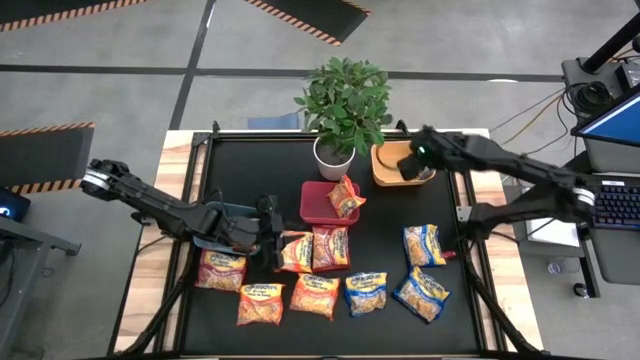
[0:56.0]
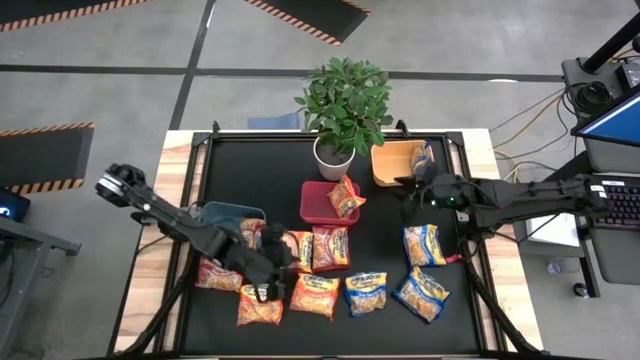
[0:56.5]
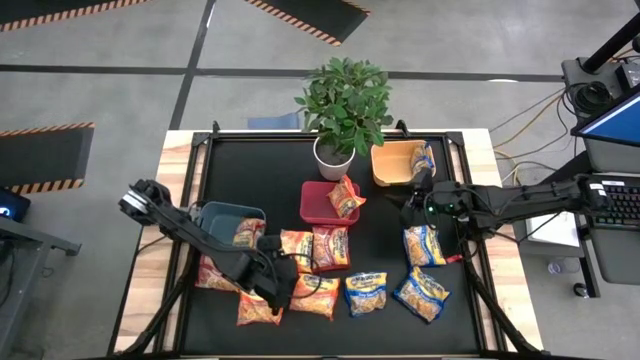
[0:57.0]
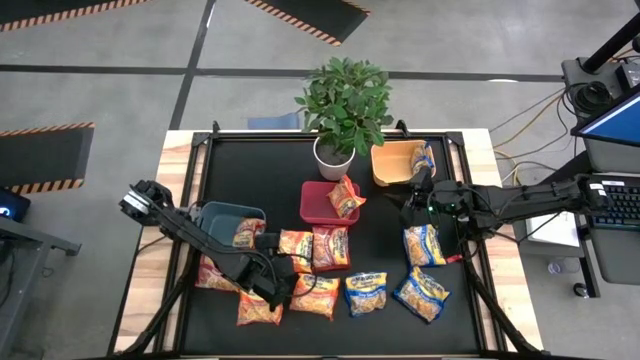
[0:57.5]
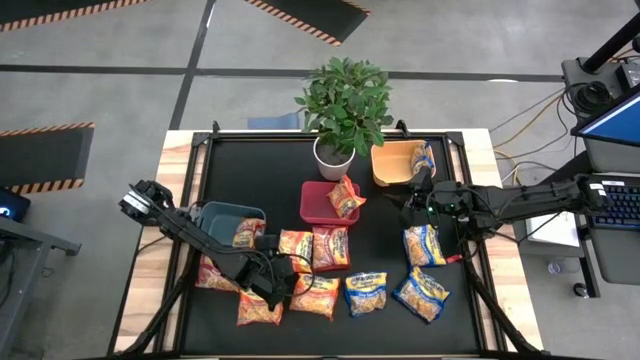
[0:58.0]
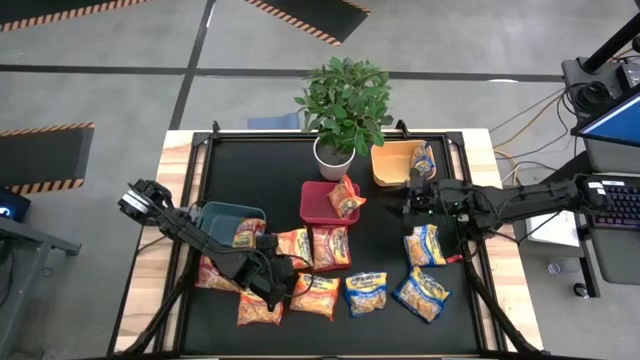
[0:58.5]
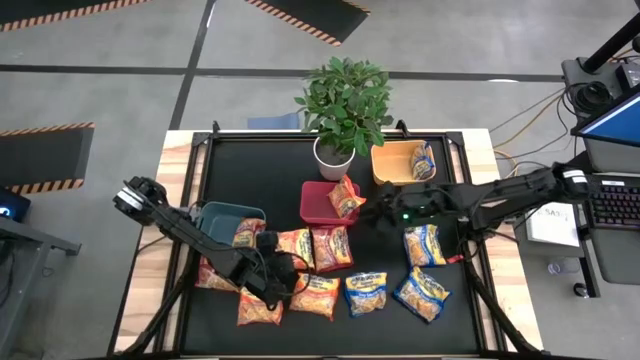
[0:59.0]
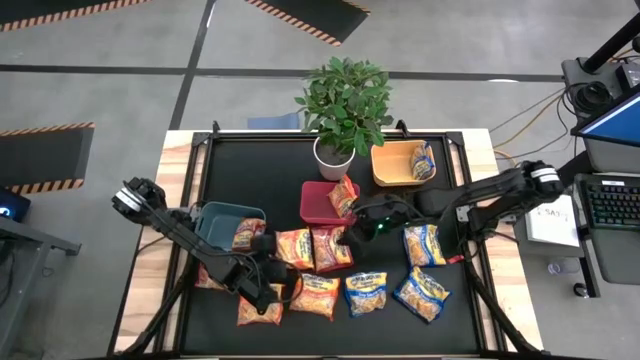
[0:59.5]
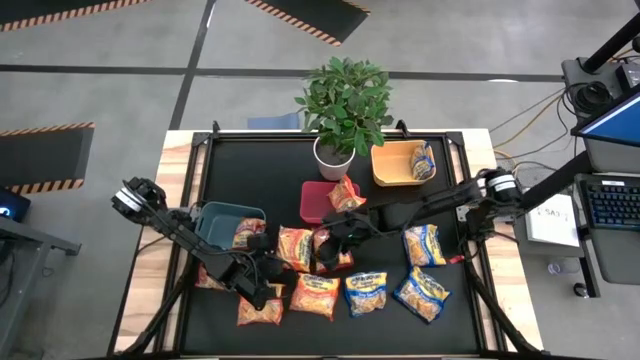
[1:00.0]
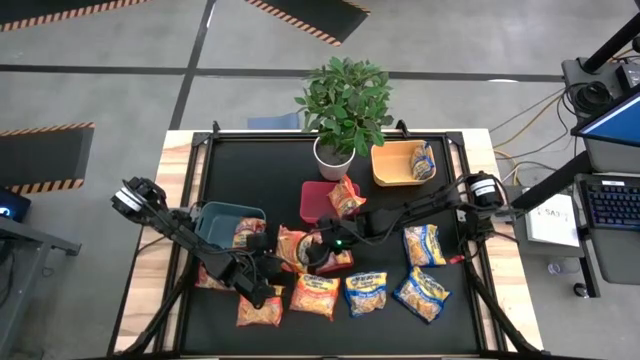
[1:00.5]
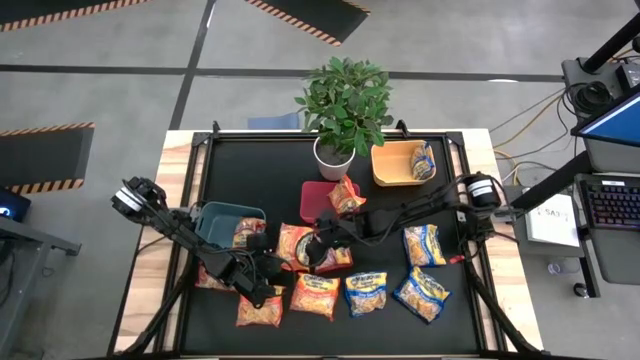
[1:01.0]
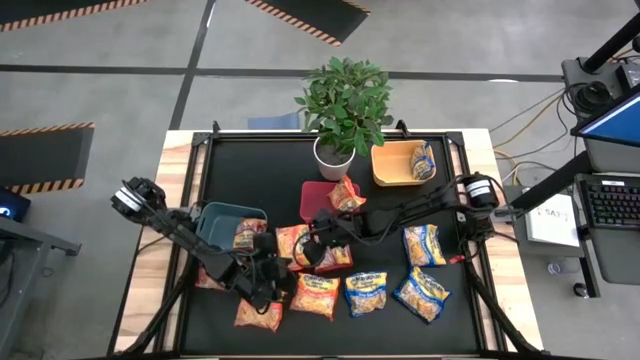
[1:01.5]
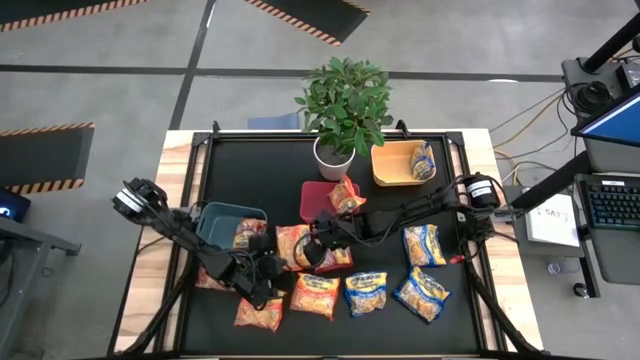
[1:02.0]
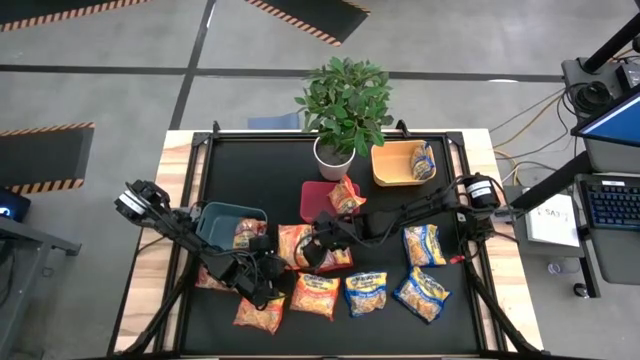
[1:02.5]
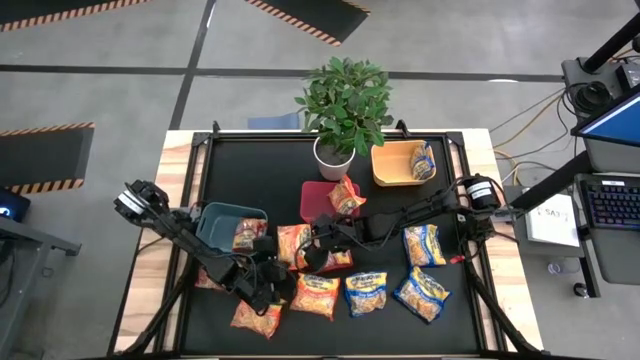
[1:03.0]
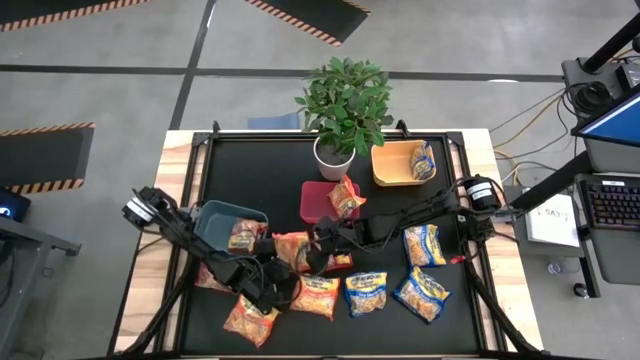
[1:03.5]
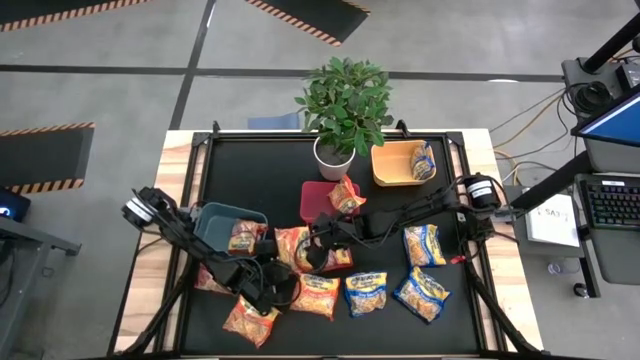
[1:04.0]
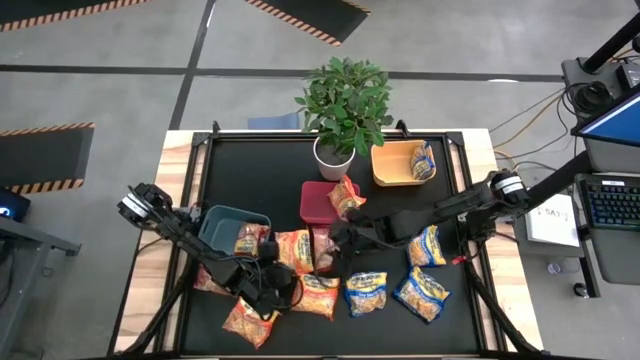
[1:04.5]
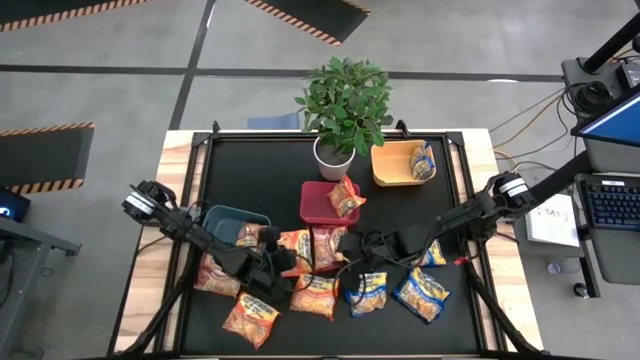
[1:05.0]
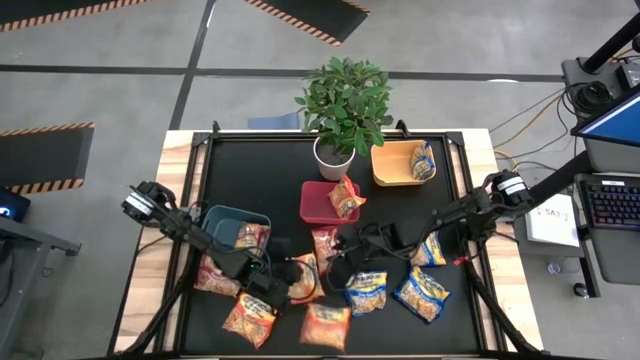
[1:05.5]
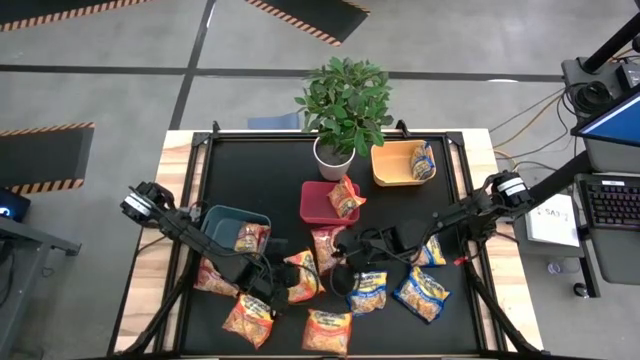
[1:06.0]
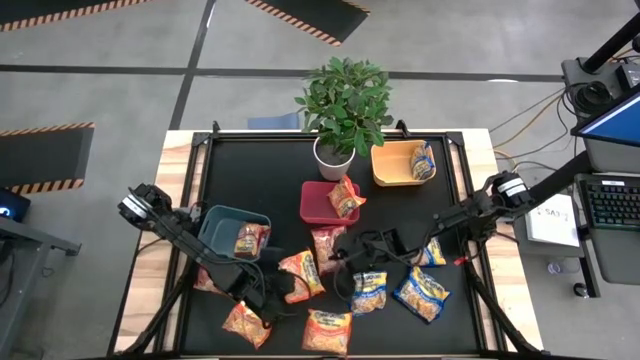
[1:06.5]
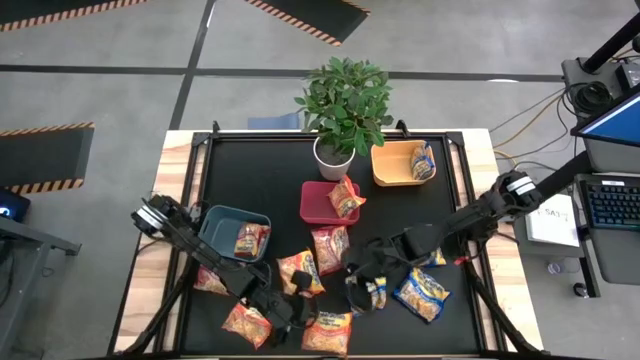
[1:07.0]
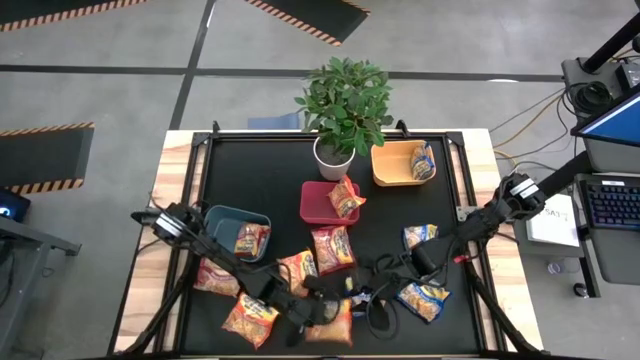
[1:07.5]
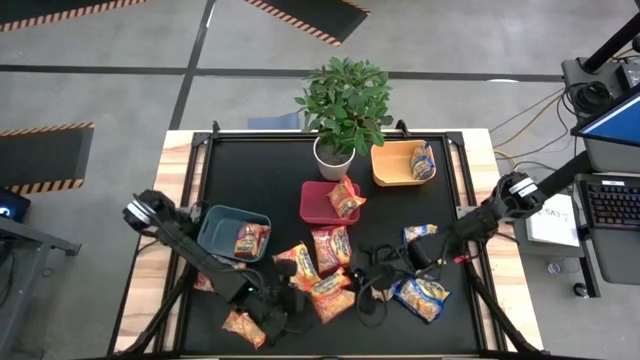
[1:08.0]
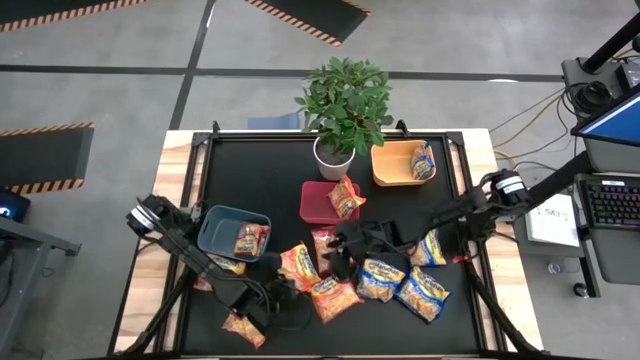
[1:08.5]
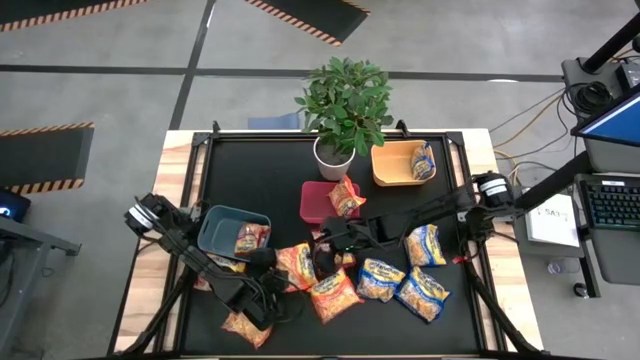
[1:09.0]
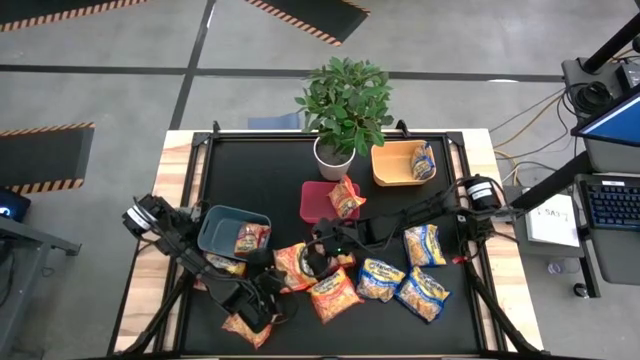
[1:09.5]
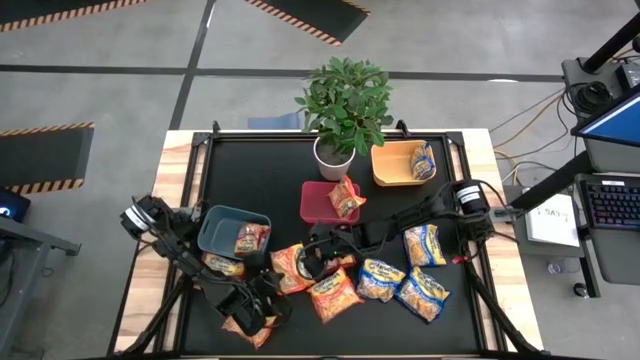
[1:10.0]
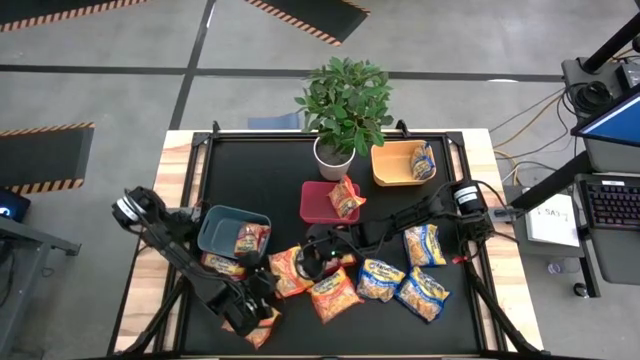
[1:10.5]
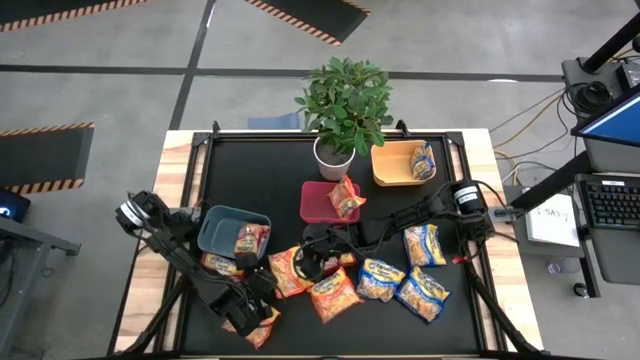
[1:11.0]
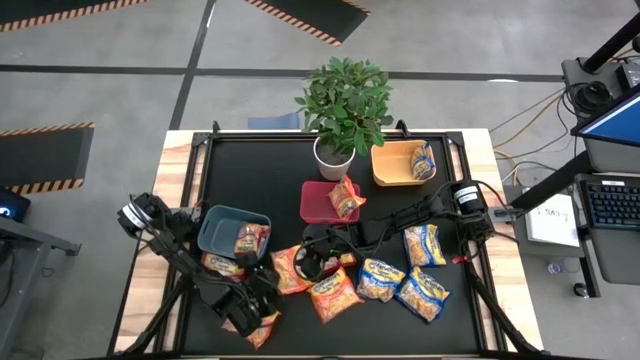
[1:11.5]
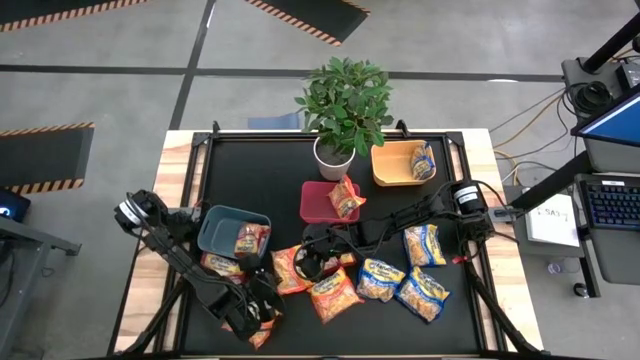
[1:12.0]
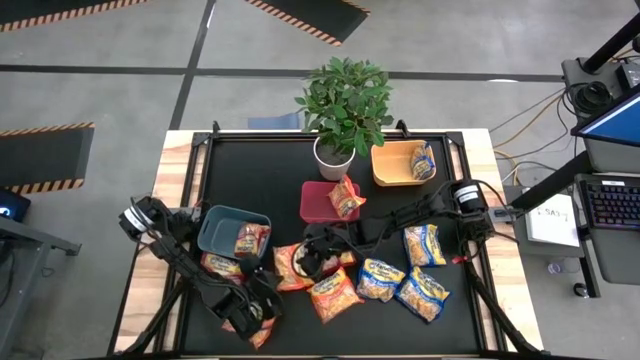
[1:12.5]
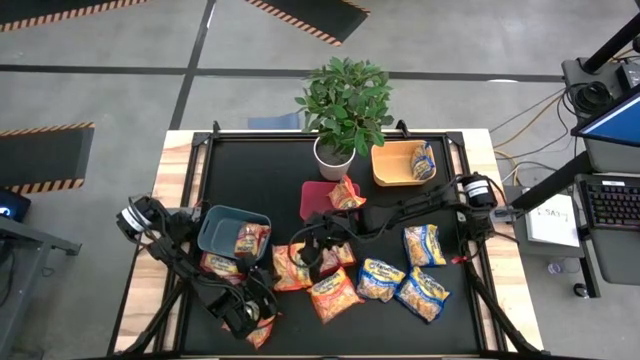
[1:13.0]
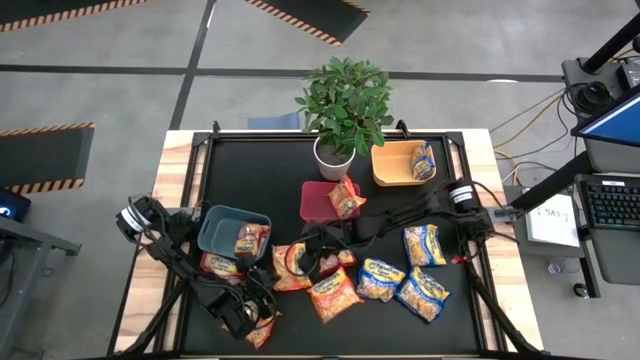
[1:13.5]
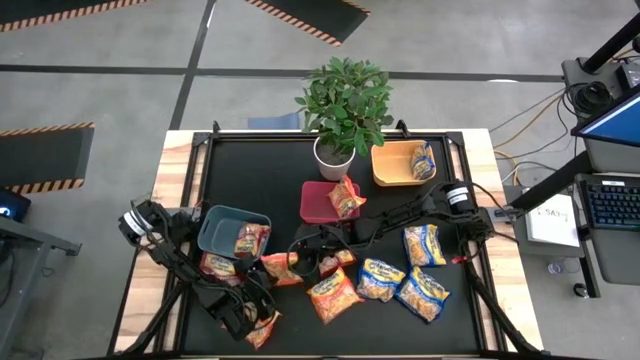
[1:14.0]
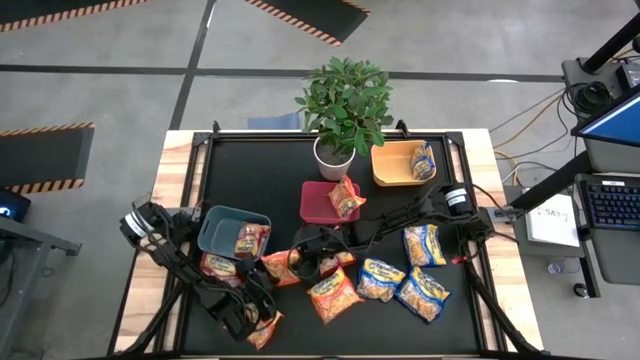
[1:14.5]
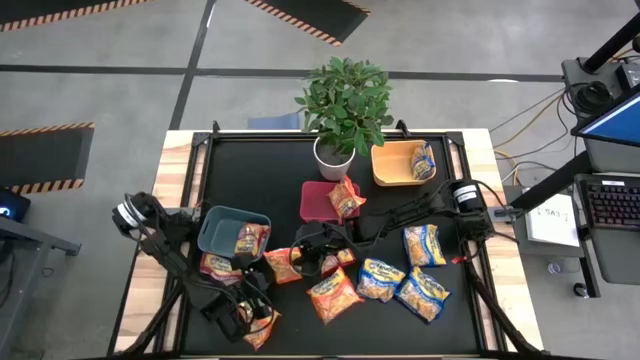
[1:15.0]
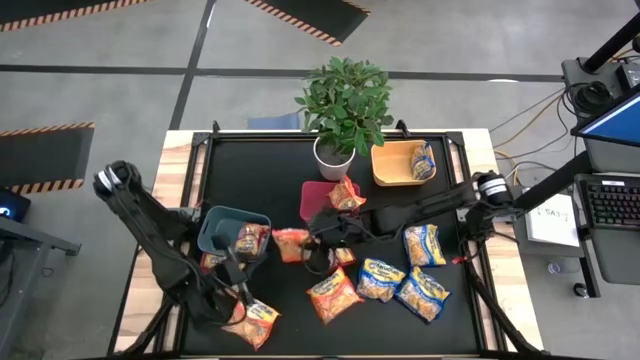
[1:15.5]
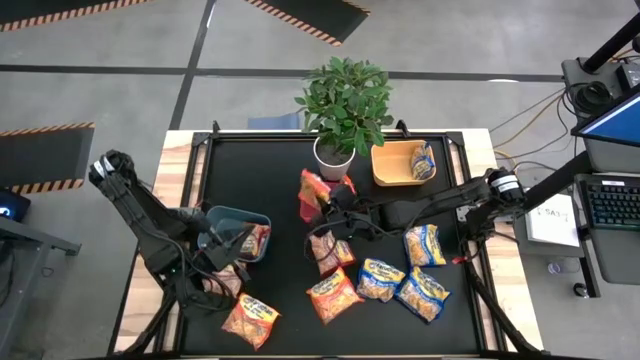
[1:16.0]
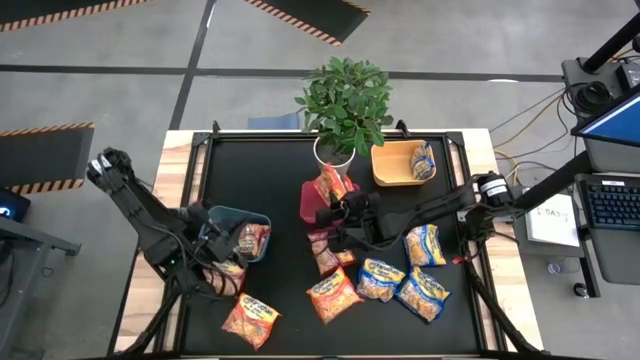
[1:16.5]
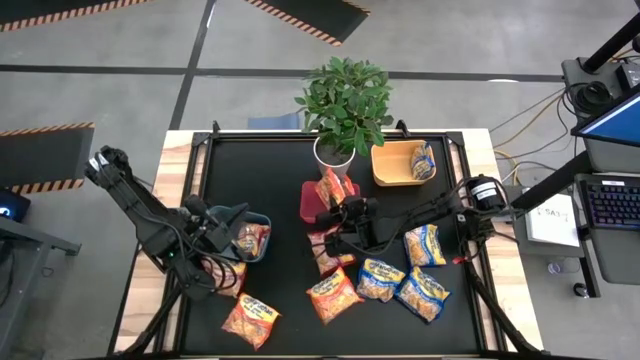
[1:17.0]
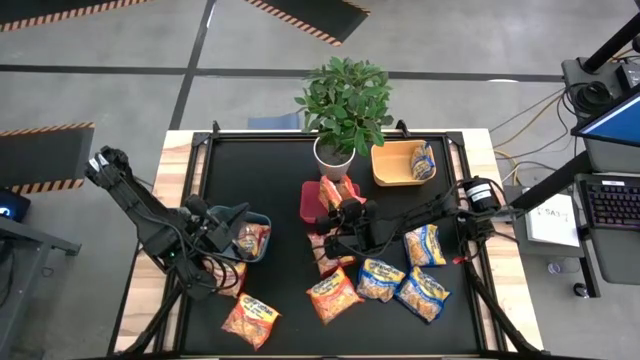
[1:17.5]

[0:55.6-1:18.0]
Task: Sort Maruchan noodles
Put the top orange noodle pack into the red bin
